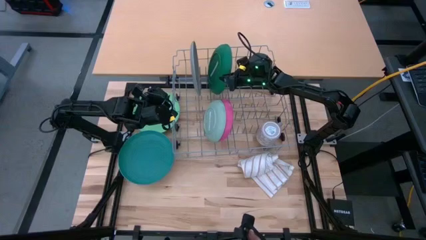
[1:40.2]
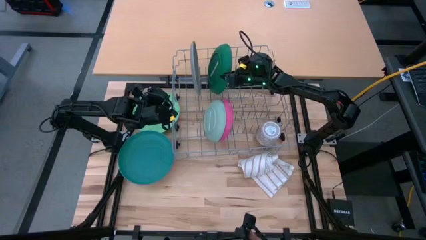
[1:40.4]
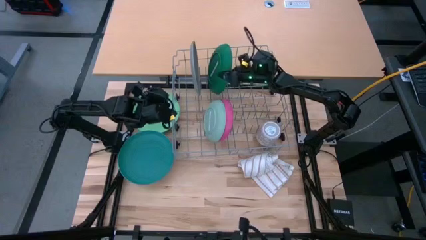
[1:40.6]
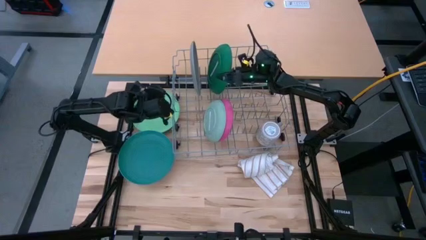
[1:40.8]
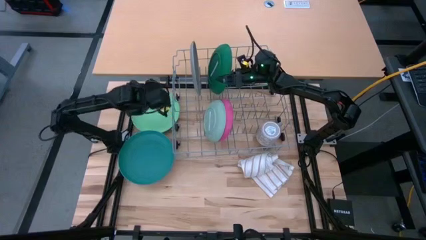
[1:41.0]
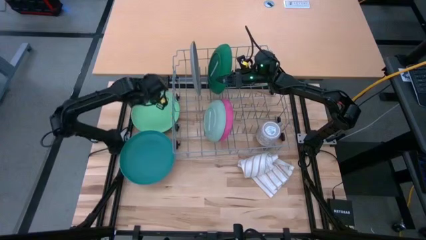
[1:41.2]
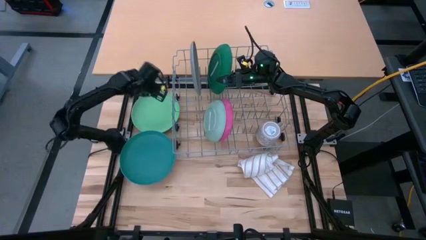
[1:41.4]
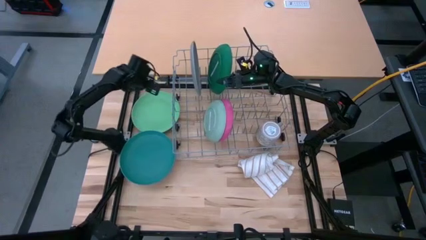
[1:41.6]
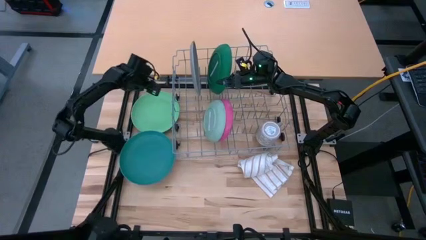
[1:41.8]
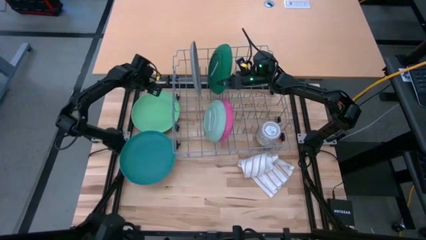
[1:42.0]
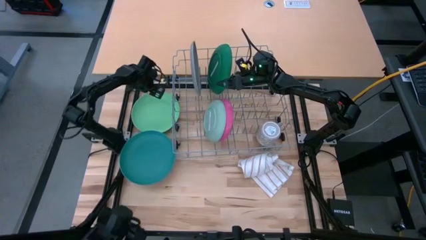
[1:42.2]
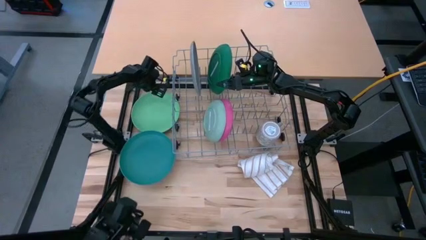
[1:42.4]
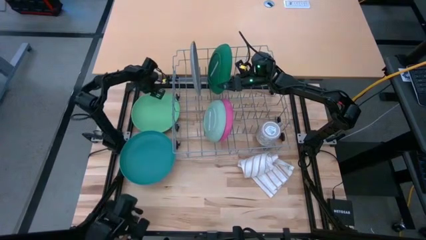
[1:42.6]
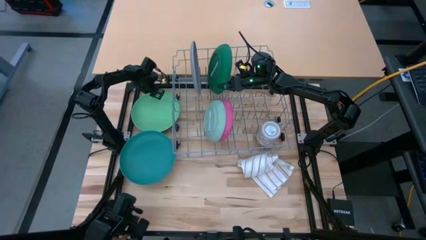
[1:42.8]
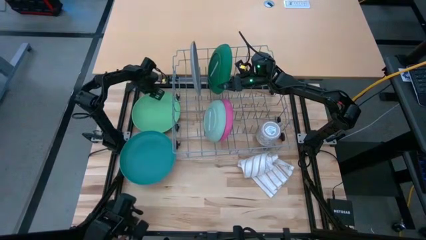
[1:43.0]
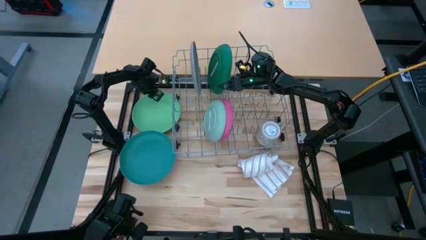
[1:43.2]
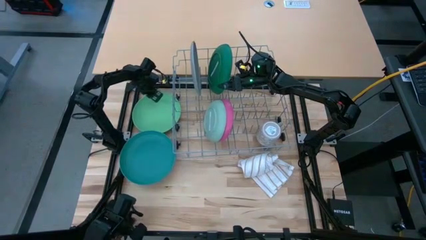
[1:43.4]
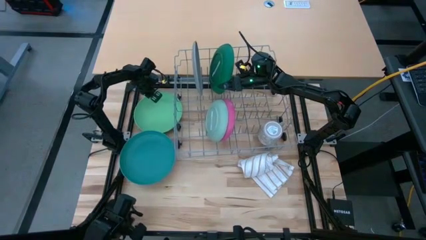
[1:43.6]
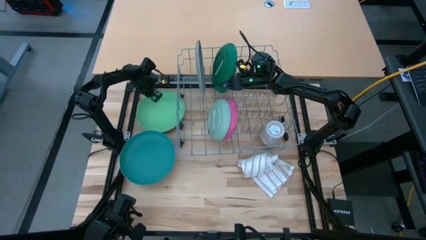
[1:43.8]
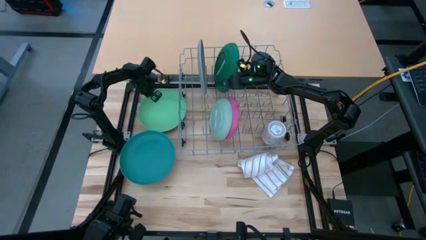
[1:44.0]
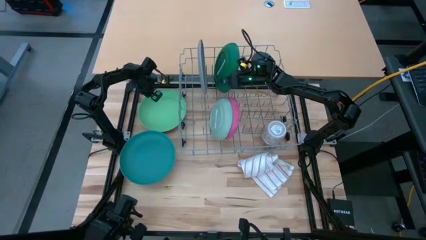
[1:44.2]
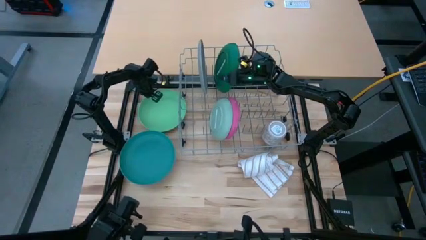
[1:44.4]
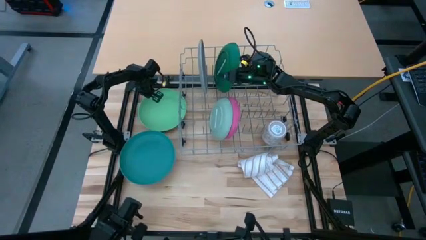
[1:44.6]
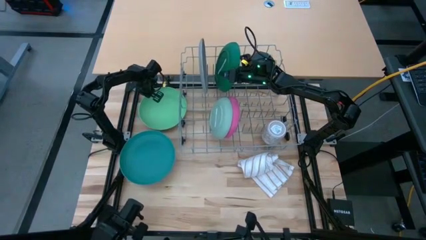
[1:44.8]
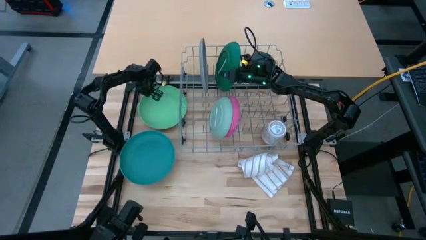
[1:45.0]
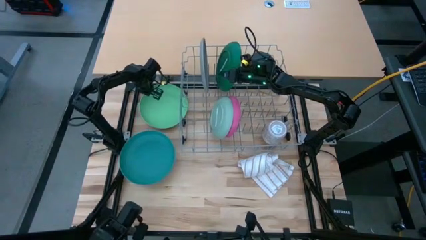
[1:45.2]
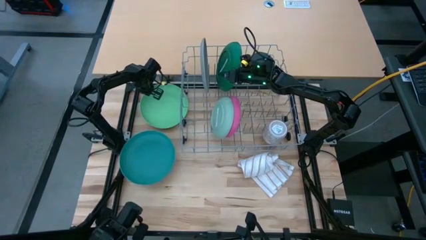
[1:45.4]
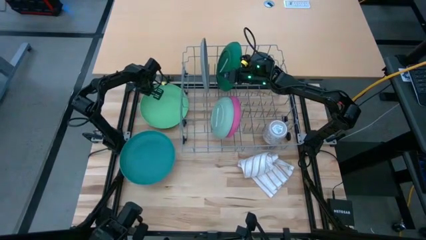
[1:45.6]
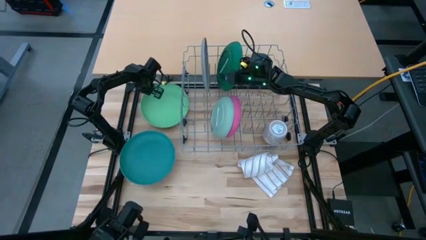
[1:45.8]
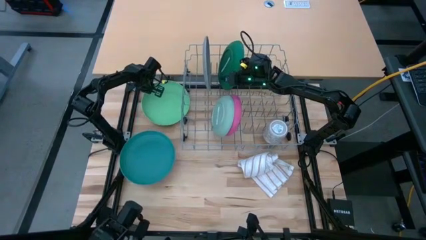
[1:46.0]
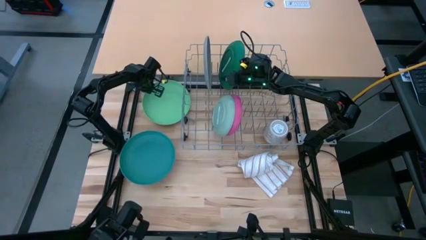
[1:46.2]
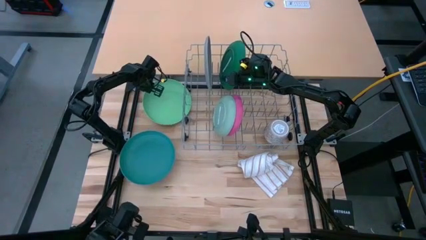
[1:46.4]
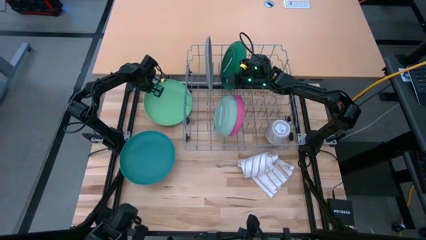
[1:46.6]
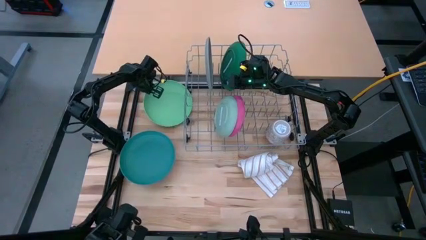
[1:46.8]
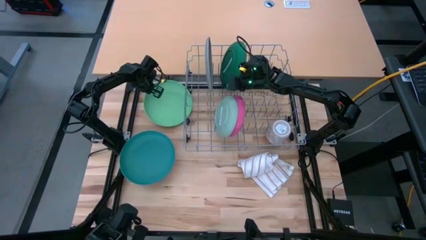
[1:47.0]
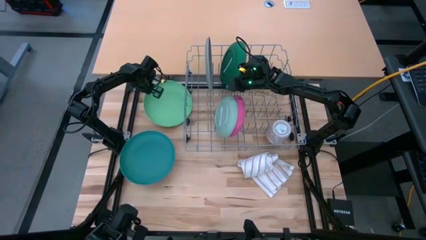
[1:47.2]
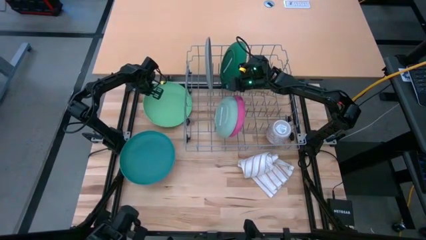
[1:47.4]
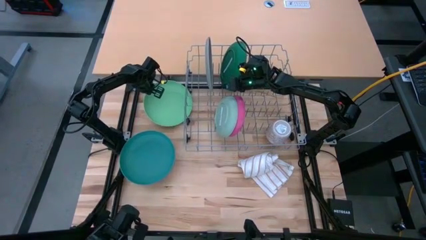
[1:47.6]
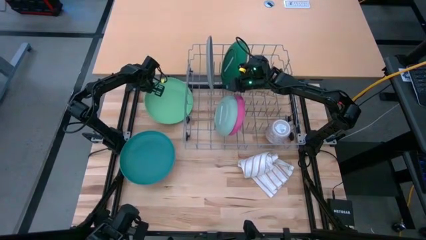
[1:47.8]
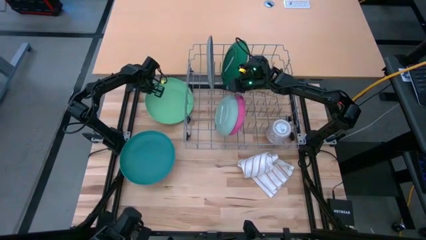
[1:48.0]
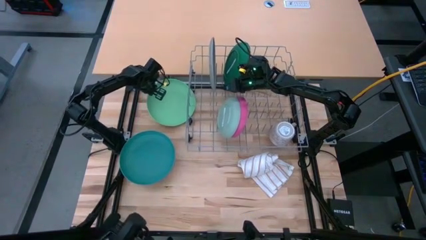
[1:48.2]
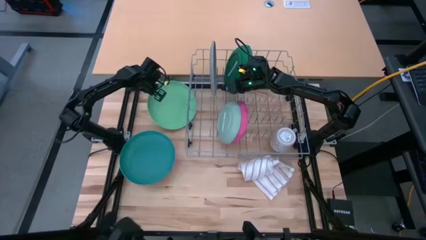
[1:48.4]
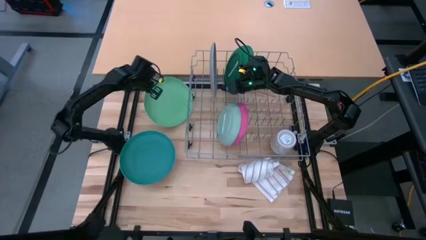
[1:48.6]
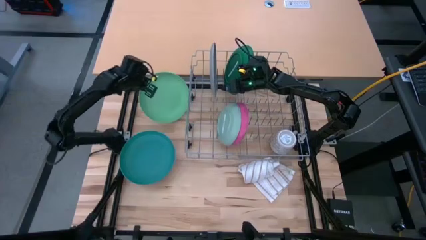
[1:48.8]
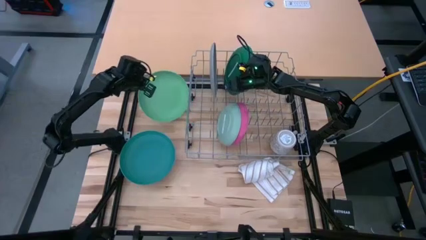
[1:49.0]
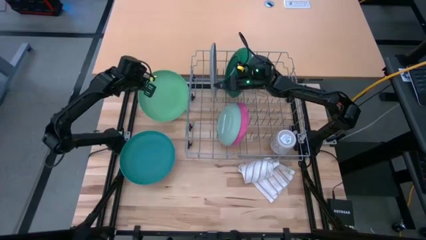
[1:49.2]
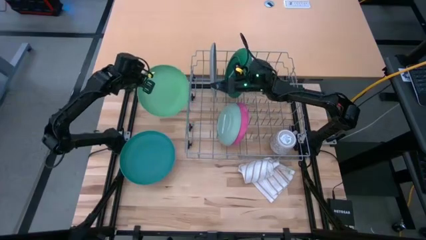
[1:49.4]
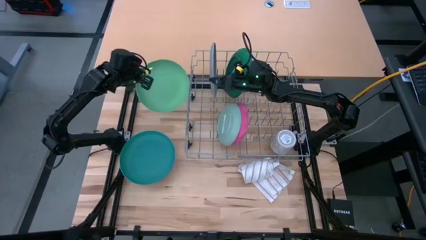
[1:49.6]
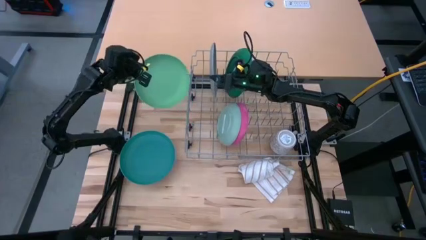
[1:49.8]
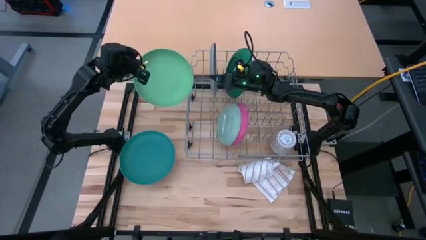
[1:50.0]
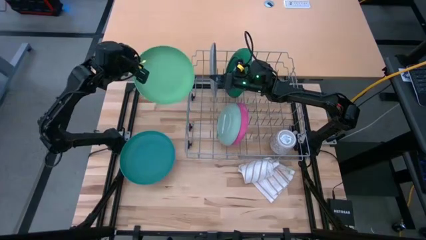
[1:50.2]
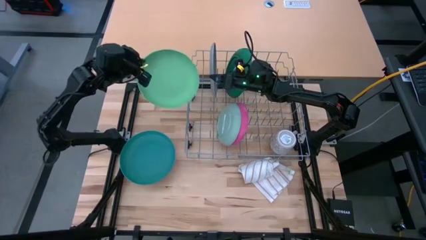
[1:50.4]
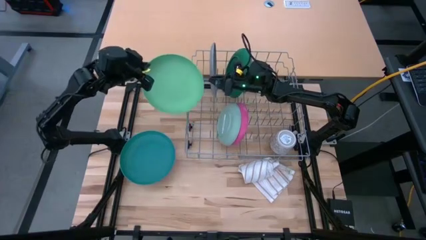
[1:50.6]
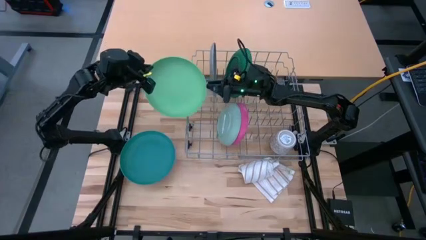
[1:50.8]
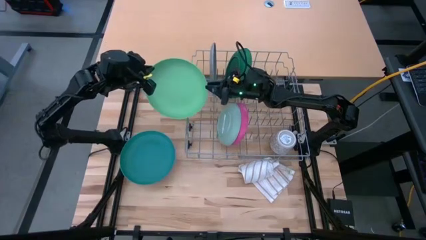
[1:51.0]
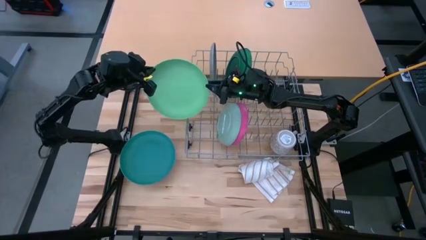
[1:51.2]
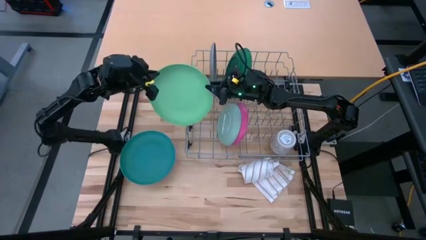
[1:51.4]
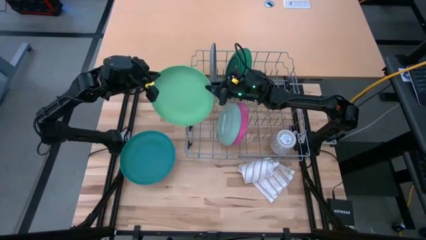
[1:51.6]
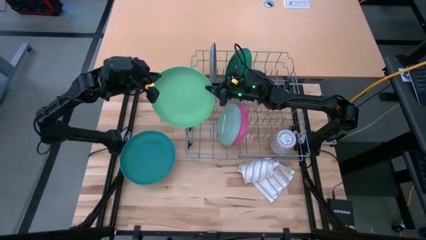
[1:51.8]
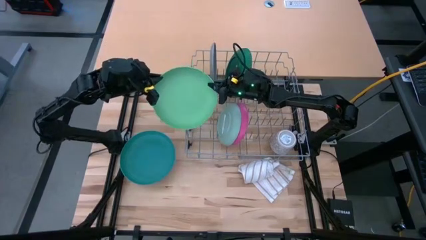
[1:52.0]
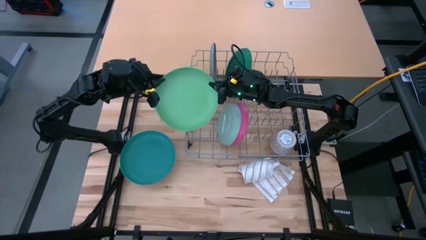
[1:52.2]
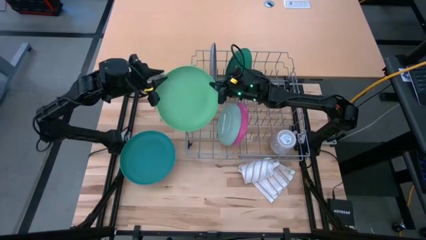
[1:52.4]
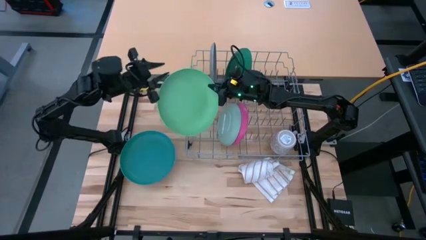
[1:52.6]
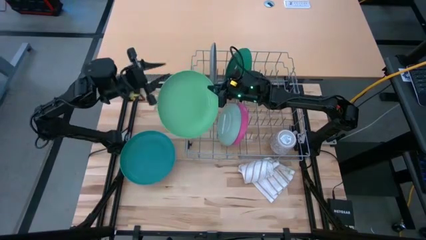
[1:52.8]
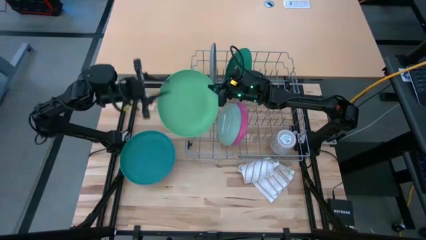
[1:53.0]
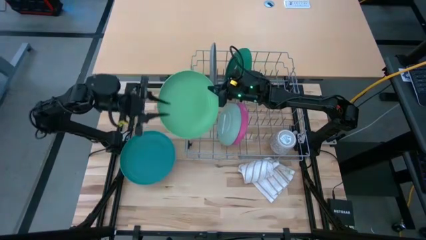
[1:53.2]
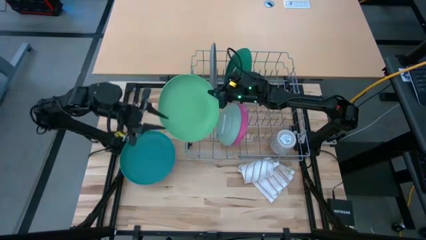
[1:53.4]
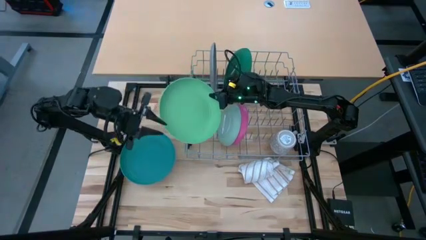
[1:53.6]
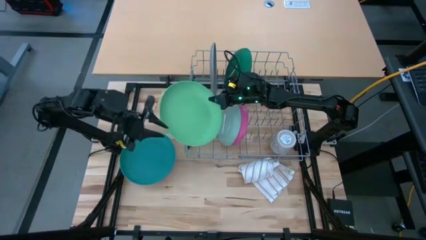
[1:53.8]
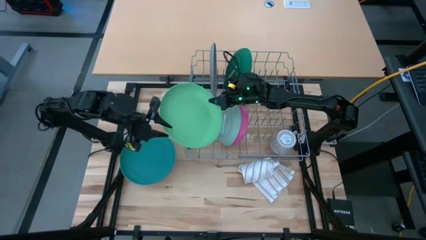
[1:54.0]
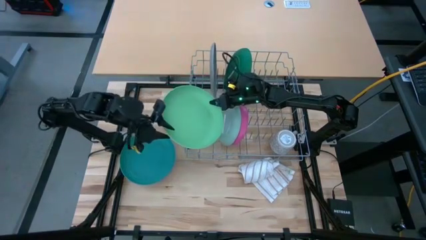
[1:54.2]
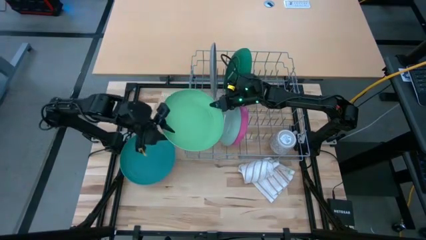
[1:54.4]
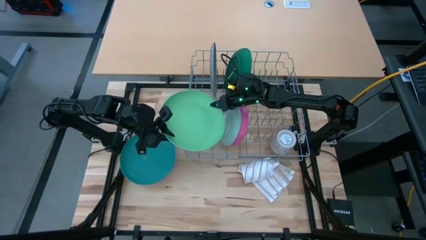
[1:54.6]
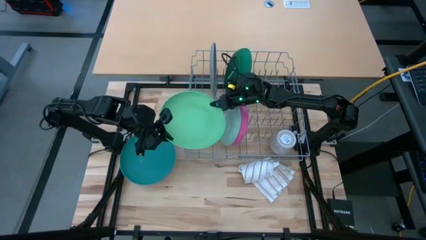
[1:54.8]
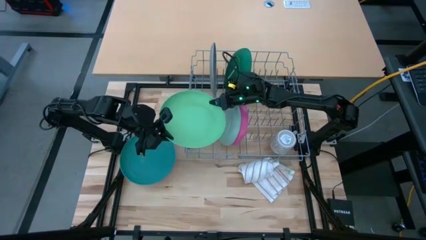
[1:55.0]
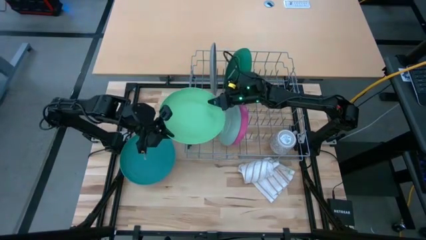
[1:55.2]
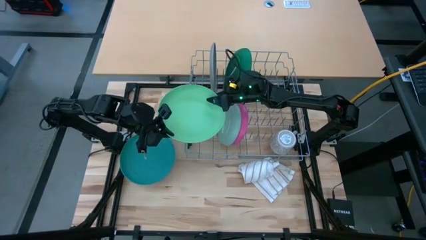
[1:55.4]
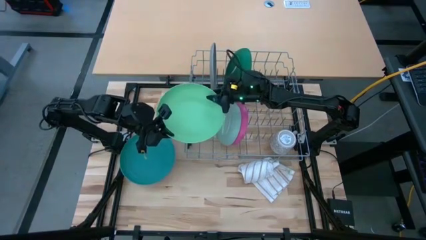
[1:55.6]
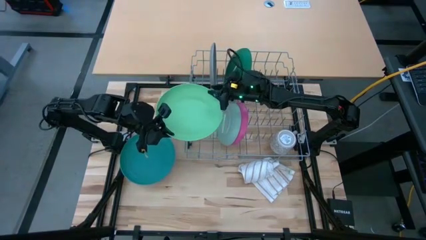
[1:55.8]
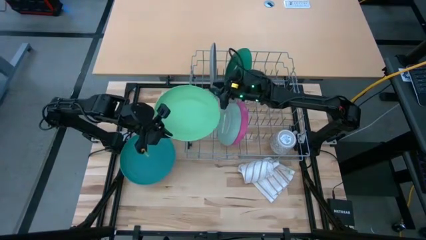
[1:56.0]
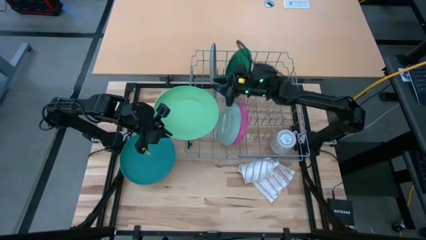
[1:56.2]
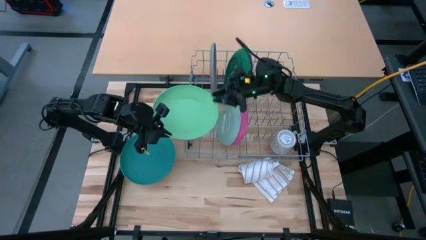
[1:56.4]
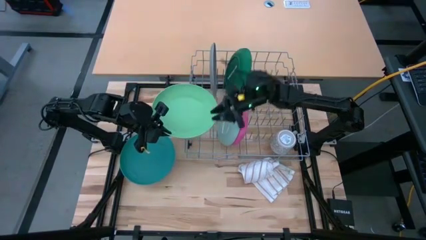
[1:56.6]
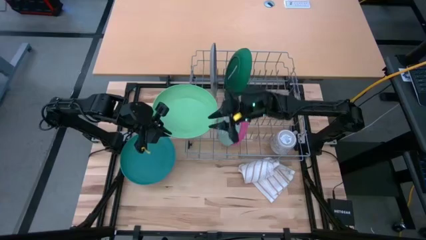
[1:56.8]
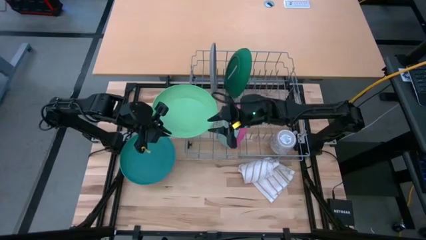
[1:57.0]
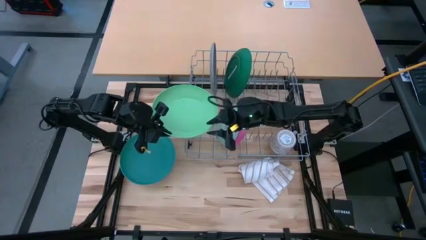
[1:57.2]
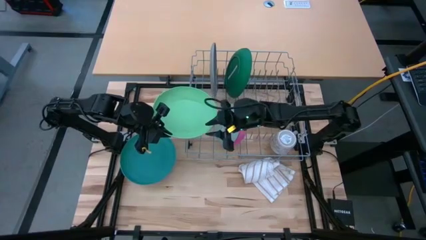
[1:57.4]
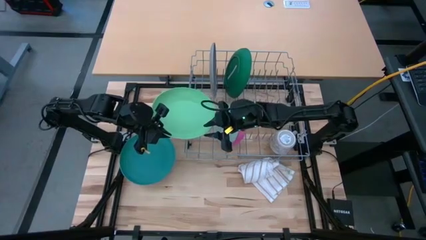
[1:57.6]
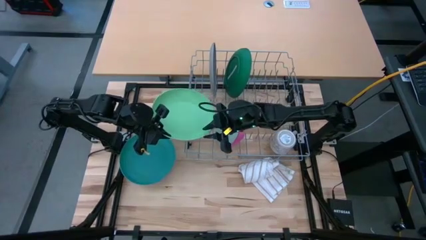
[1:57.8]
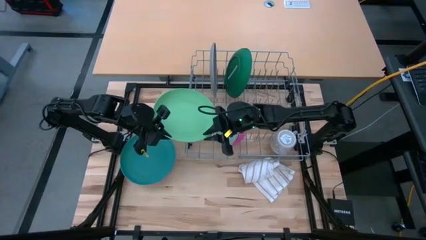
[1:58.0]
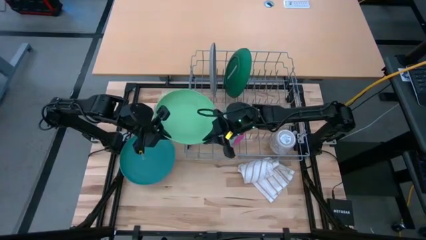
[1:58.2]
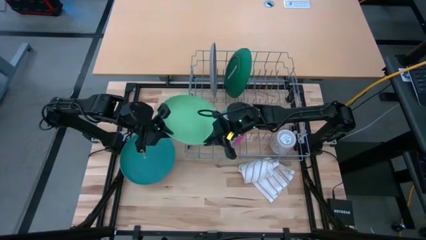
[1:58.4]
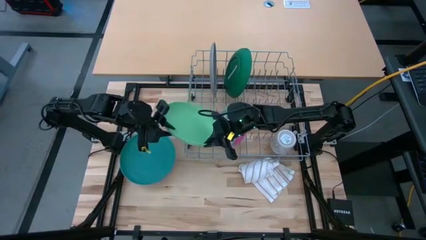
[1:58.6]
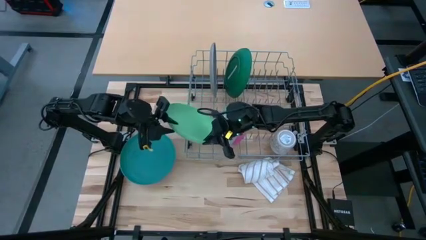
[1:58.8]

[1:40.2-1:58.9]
Task: Sort dishes
Put the green plate in the dish rack
